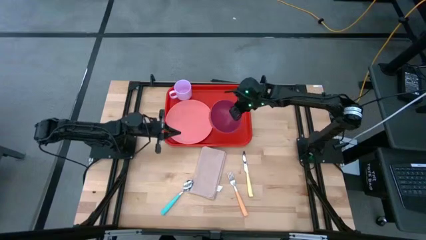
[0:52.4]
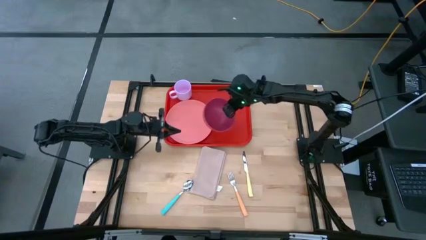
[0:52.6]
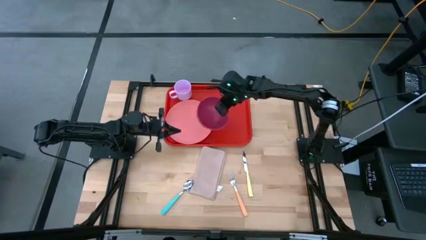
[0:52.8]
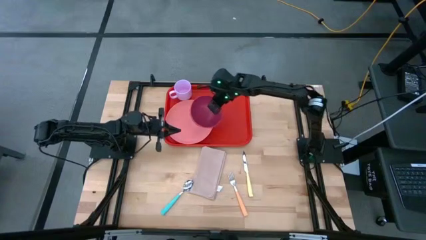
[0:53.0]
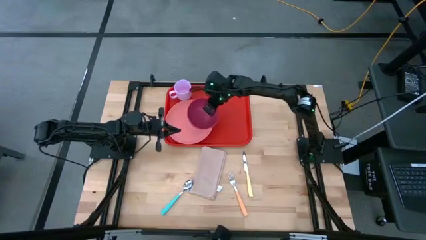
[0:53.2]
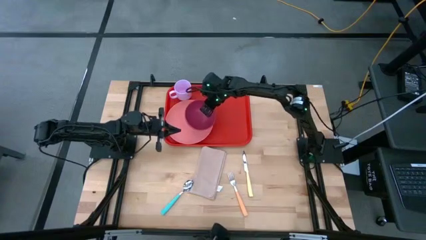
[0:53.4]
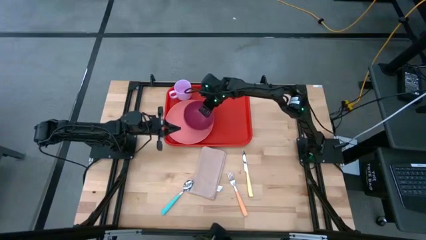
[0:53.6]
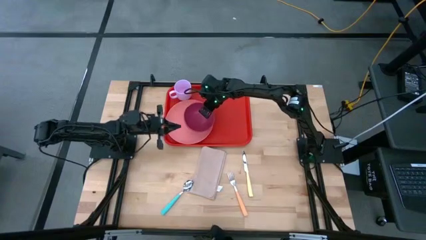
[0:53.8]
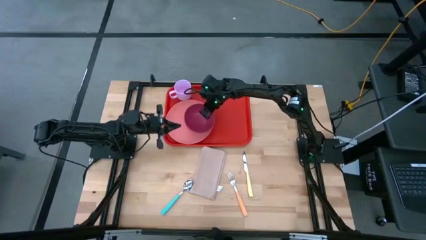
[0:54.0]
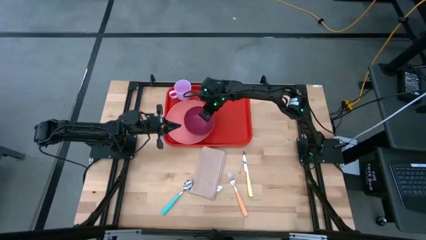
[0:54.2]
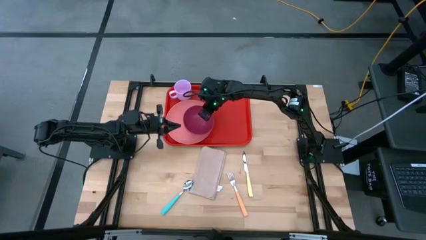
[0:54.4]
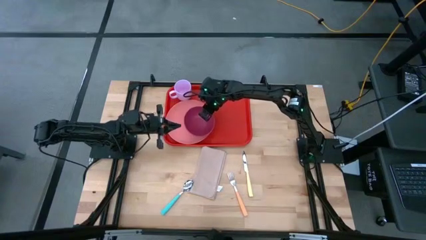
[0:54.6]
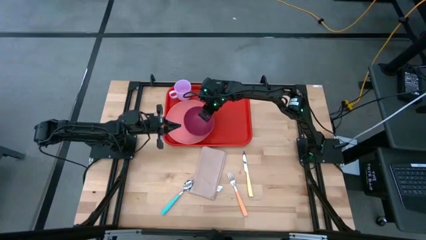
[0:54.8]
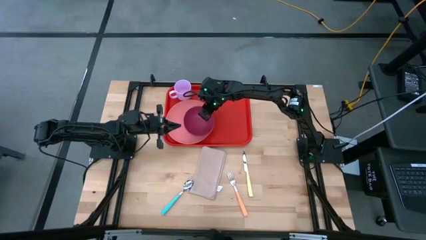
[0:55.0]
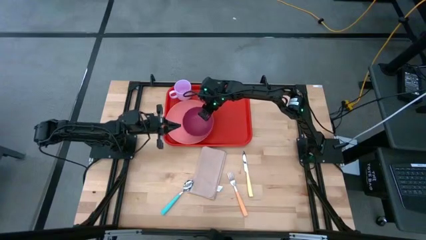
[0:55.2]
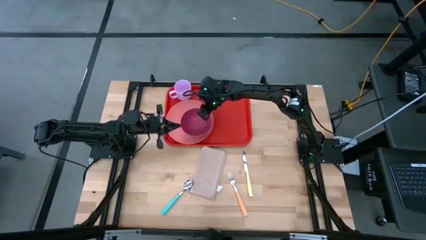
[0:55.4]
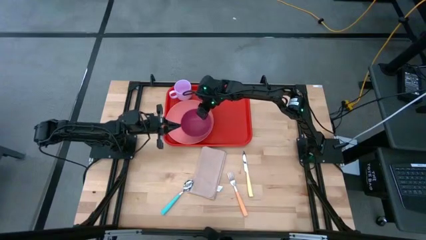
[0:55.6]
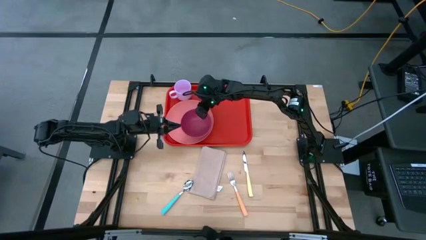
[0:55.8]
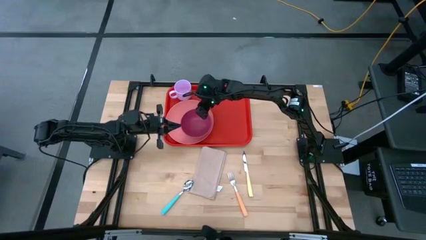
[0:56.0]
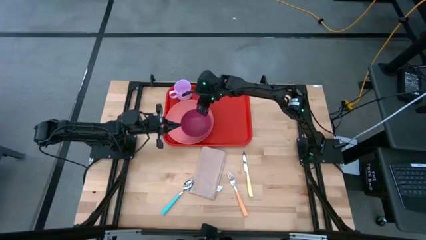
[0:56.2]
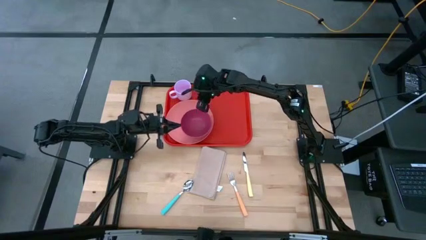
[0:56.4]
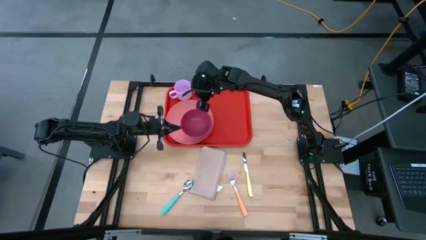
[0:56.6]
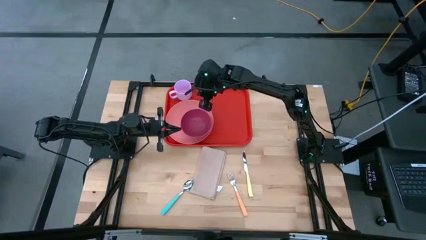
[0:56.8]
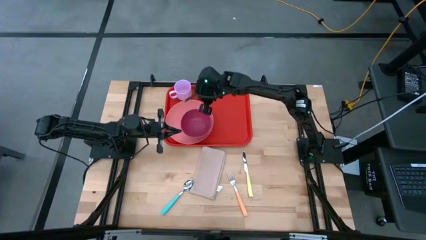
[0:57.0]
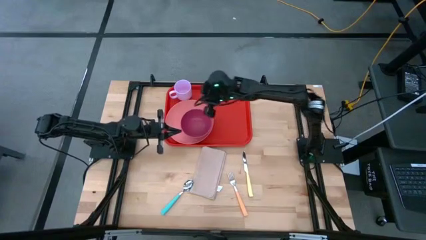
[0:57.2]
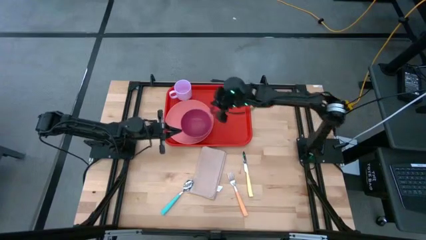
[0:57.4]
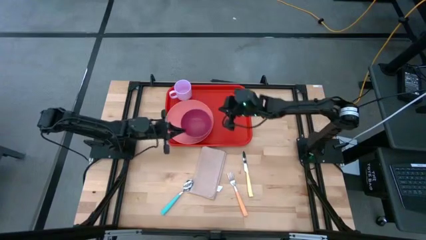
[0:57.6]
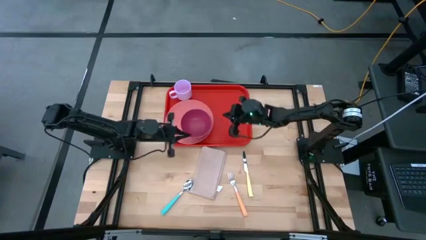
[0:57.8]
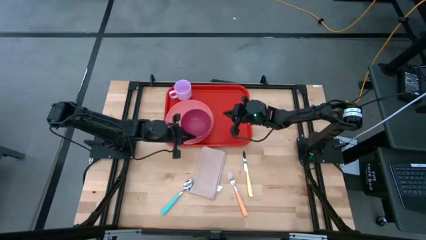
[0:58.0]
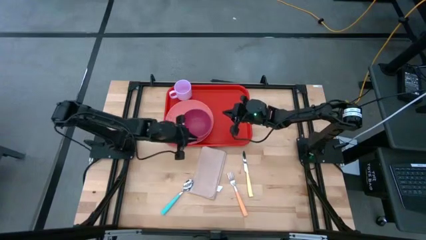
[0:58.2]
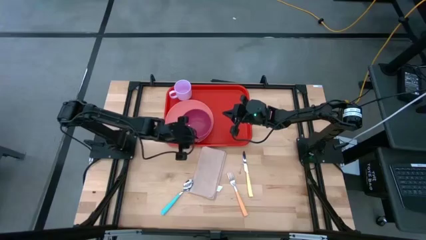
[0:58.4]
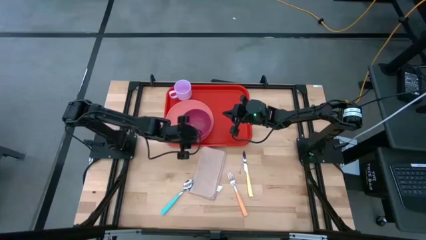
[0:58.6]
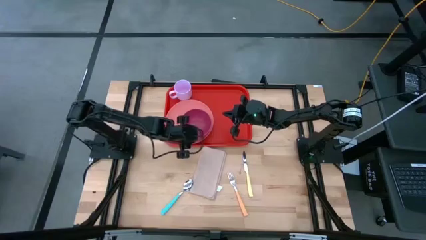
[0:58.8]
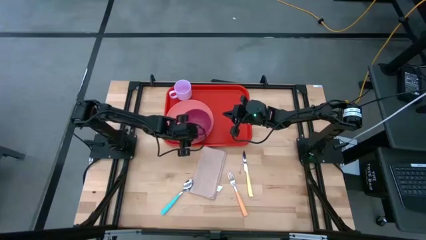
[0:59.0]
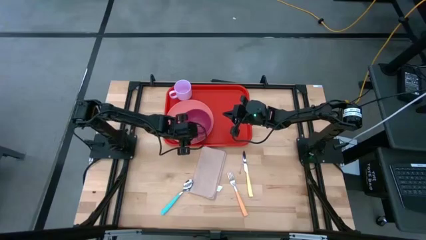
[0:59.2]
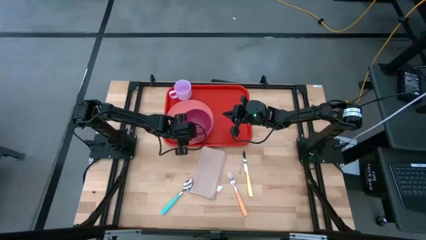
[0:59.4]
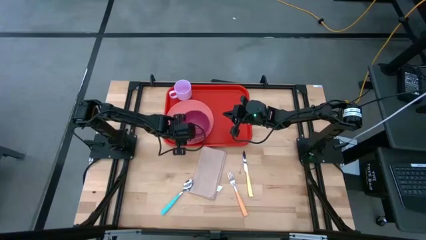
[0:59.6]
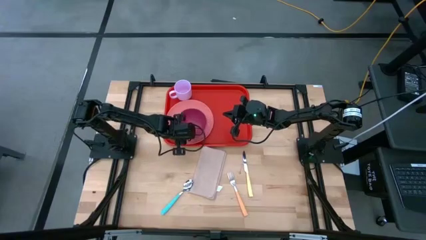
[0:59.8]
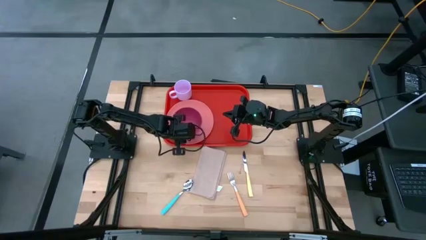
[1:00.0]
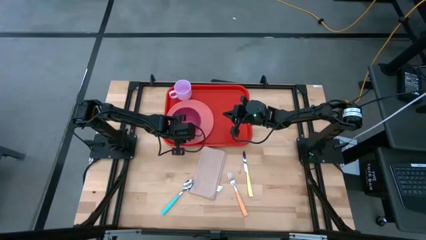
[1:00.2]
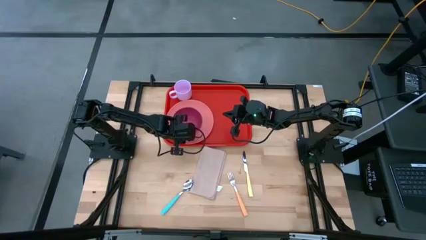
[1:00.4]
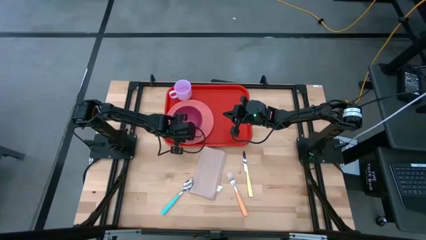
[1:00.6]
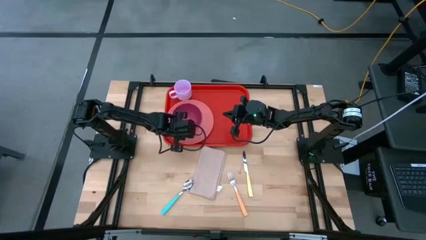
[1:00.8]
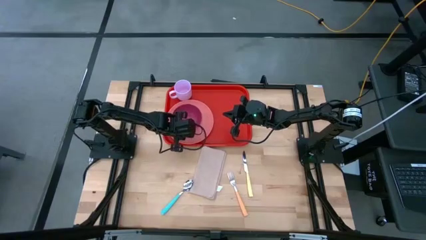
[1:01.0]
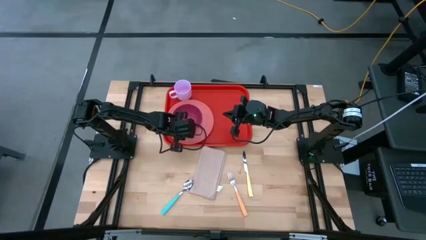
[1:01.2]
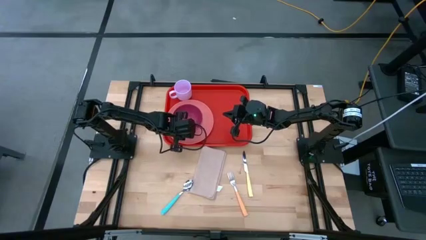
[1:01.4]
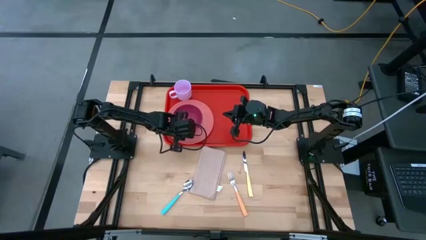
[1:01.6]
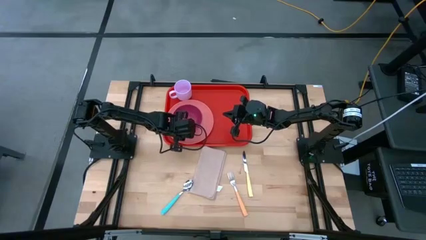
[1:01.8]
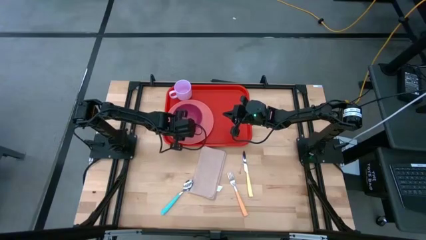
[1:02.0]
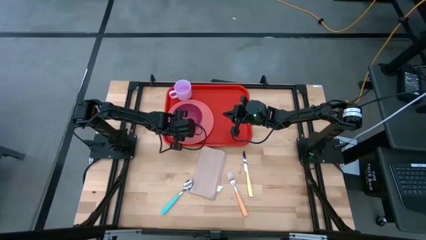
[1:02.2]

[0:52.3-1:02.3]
Task: Set up tray
Put the pink bowl on top of the light orange plate

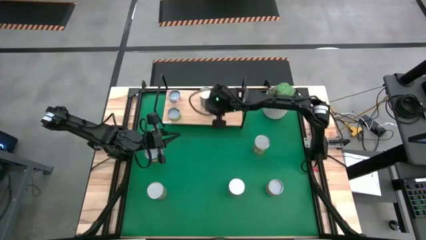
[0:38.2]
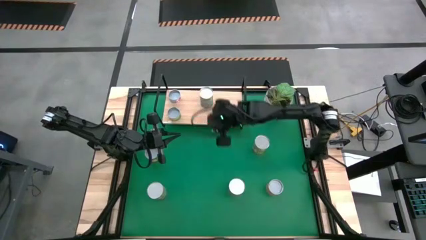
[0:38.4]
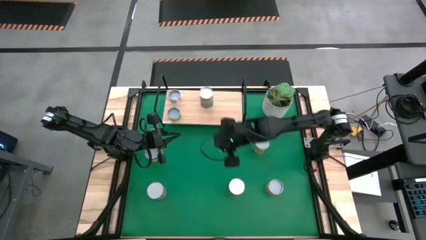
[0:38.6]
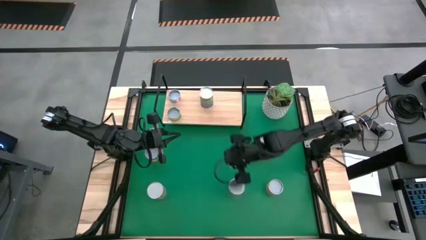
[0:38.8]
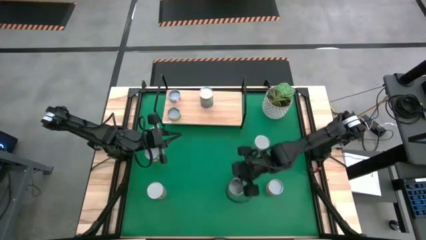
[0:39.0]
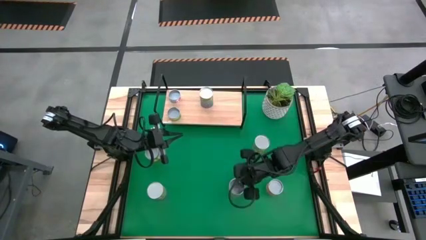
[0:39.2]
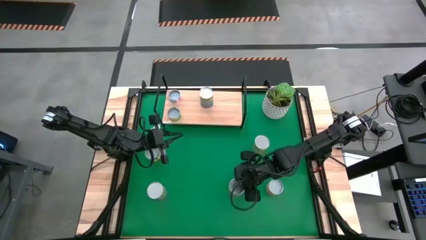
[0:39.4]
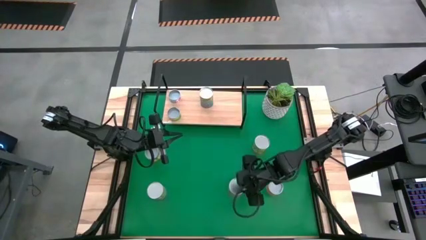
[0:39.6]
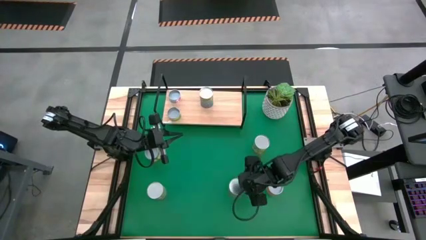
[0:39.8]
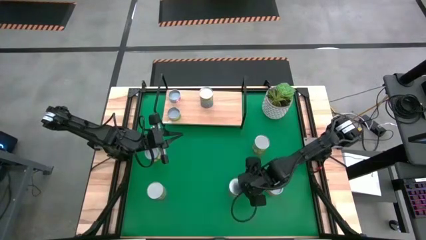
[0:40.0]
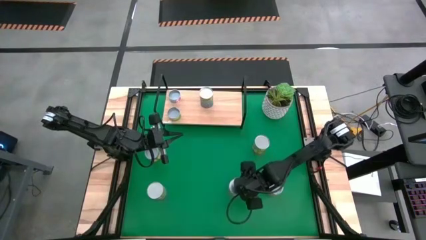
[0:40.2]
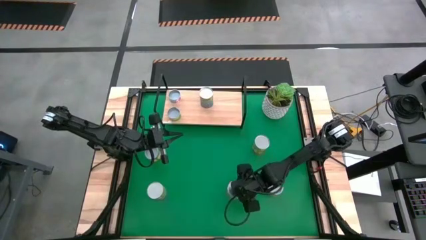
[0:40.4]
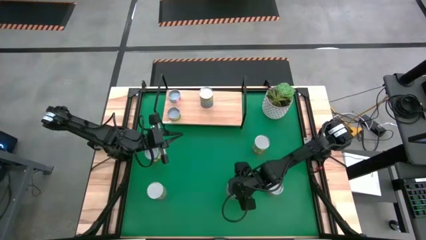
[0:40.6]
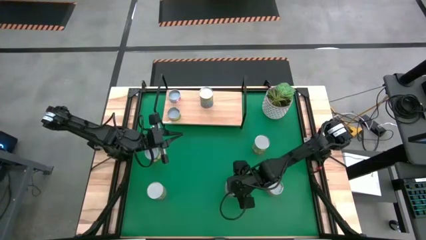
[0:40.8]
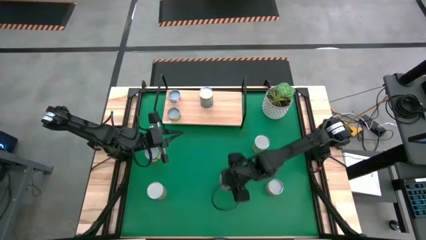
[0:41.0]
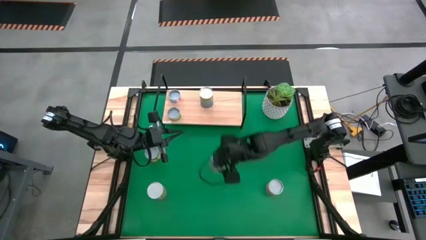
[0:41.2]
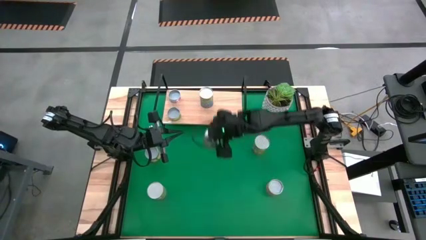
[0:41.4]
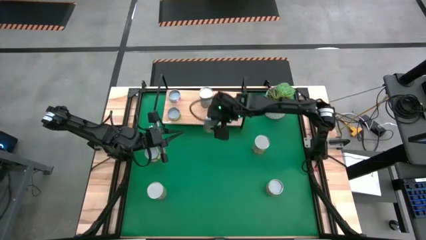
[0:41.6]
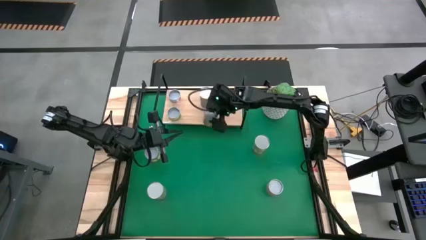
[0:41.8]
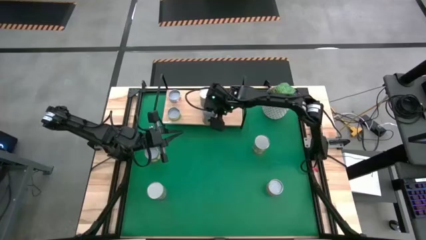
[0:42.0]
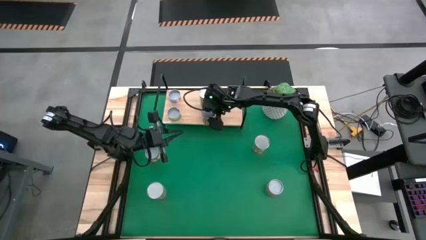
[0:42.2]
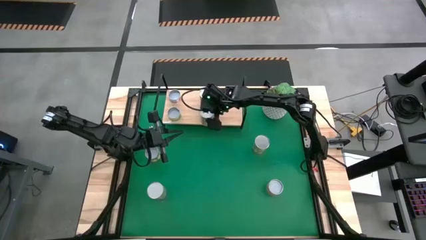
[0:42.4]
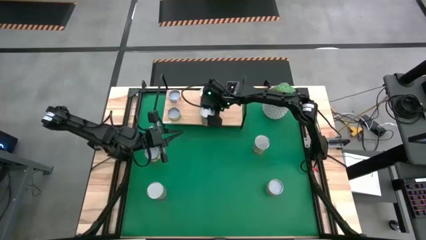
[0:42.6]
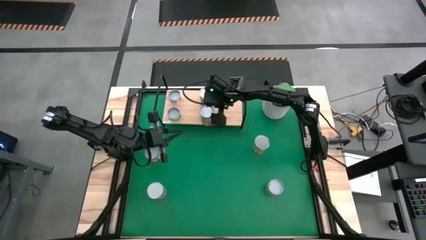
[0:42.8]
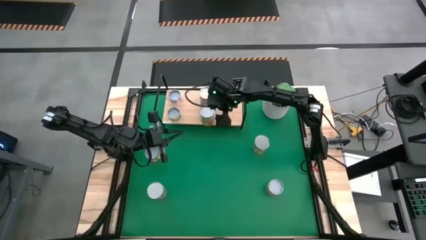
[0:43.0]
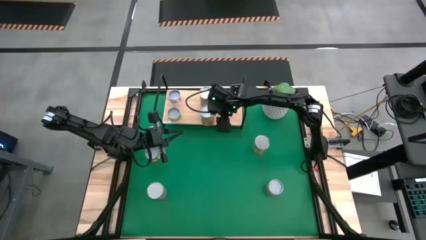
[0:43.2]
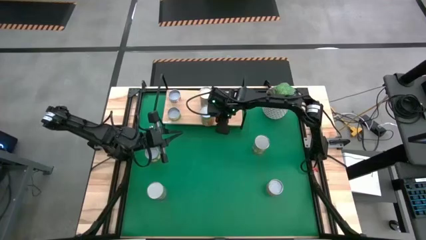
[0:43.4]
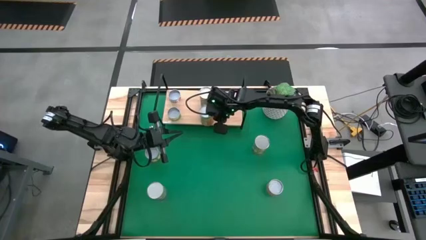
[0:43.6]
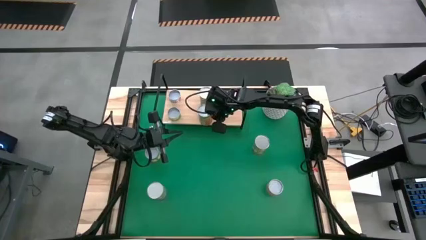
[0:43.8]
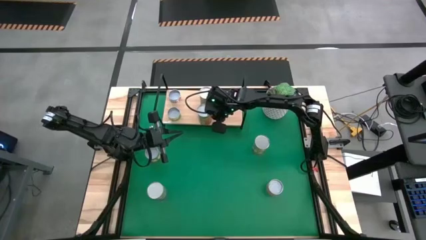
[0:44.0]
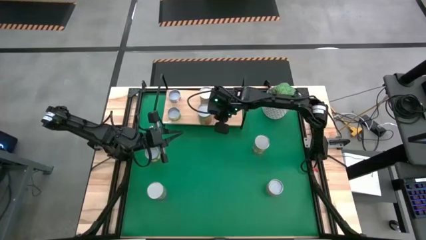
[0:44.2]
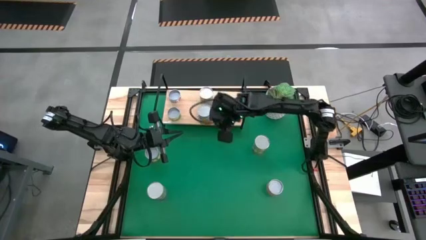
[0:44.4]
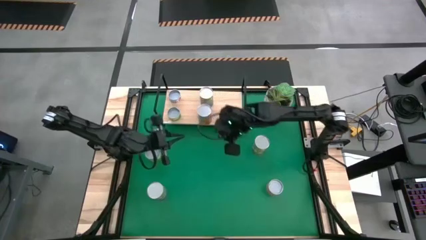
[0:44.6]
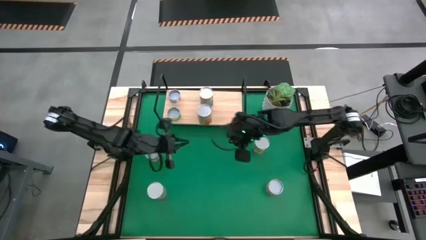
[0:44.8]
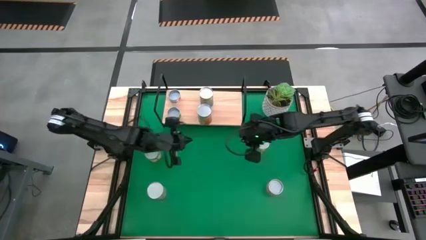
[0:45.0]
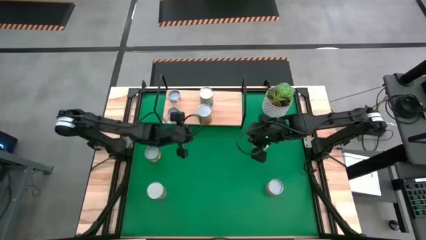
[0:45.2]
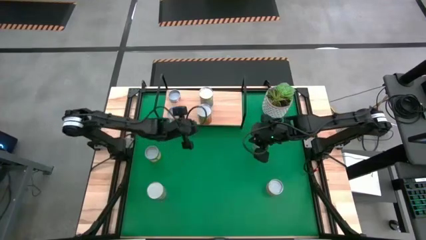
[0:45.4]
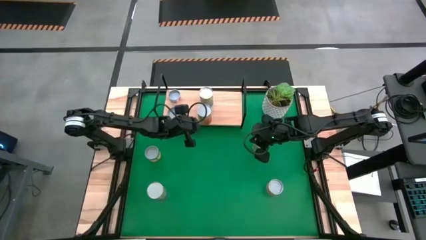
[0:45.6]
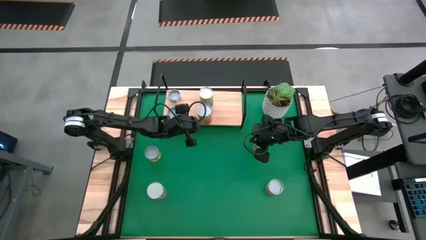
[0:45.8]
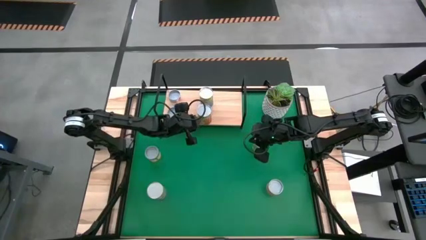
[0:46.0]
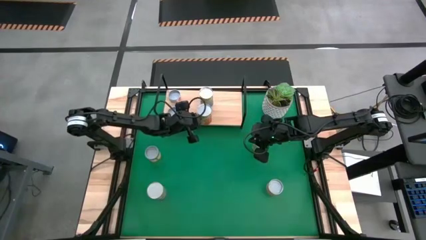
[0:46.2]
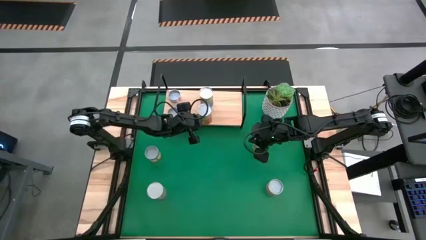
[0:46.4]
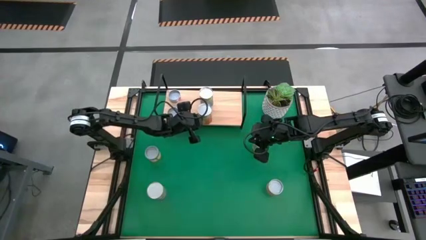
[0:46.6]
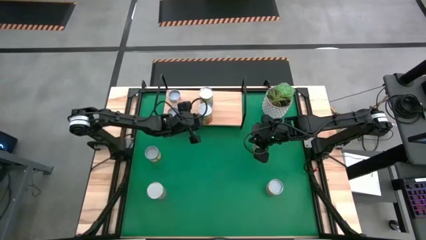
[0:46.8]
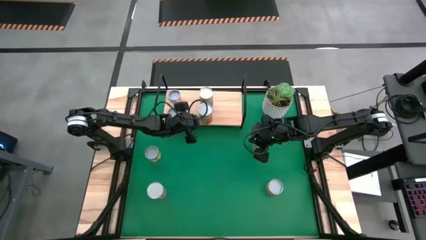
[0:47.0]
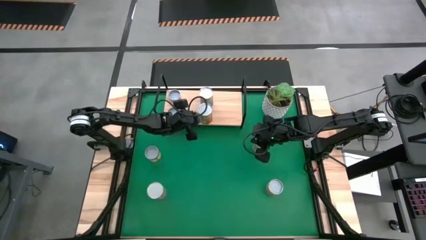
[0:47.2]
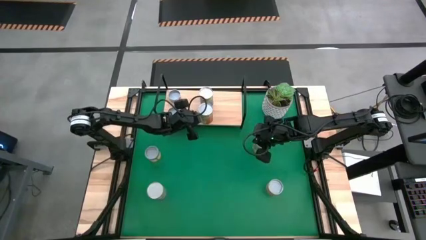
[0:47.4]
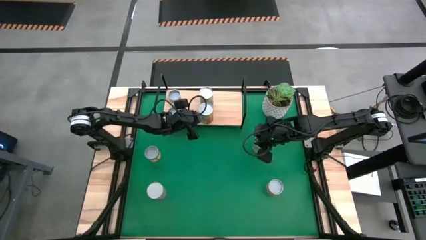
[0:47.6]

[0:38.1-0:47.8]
Task: Pick and place cans onto a shelf
Put the canned pineapple on the shelf
